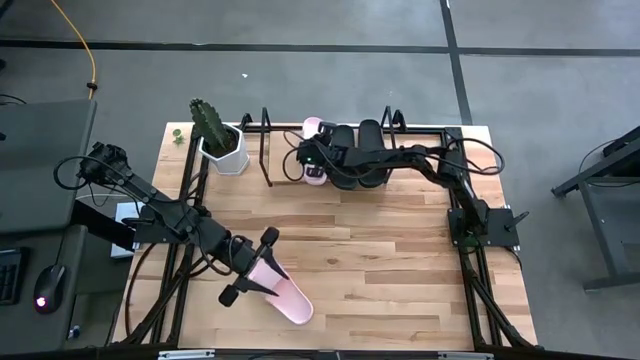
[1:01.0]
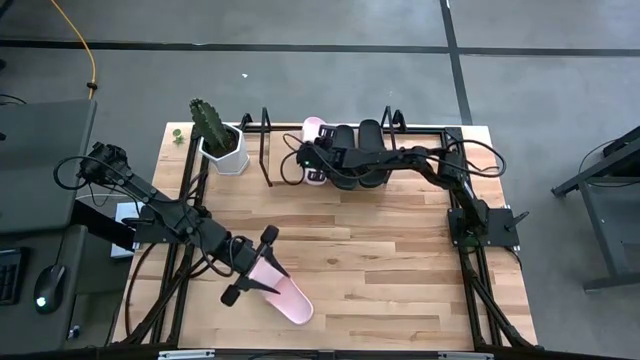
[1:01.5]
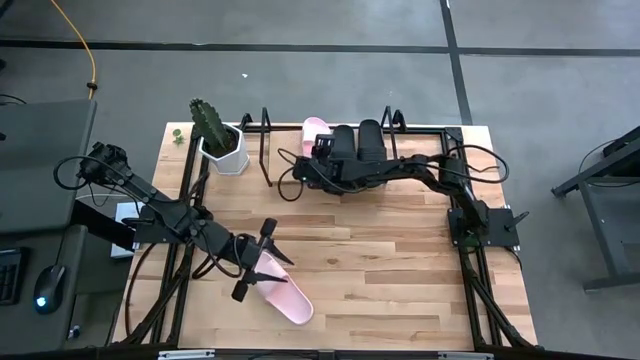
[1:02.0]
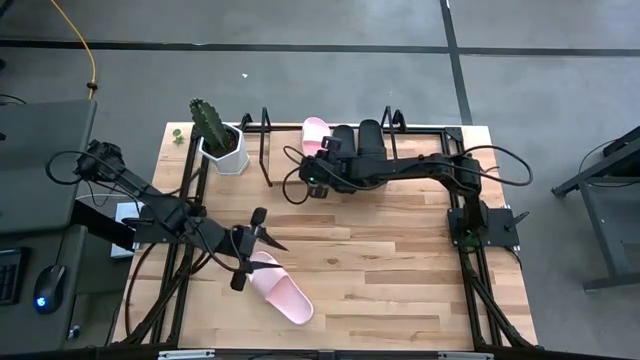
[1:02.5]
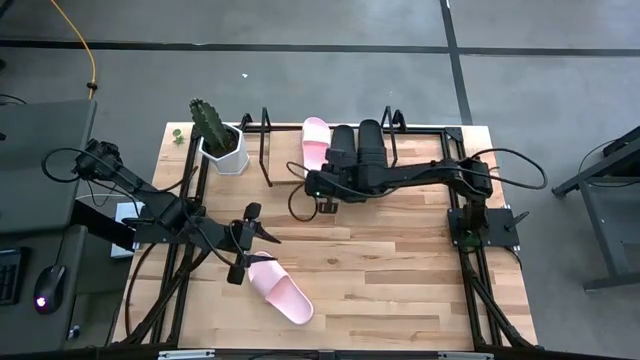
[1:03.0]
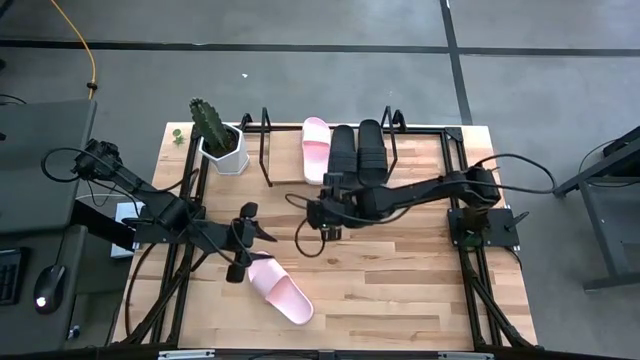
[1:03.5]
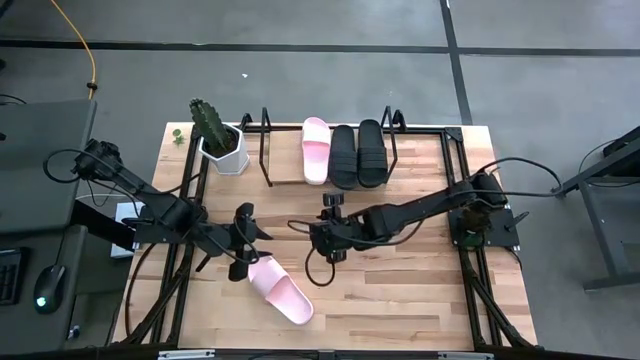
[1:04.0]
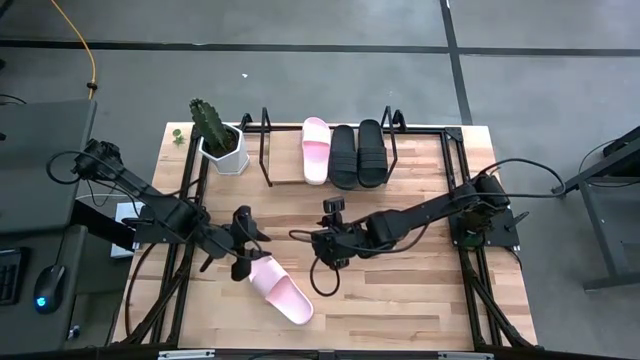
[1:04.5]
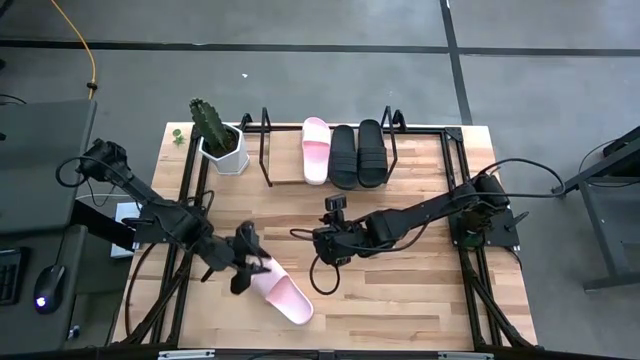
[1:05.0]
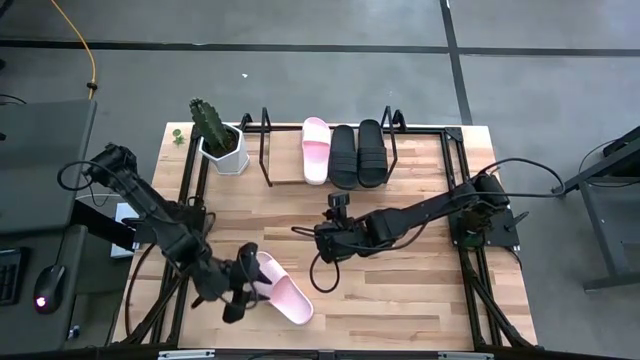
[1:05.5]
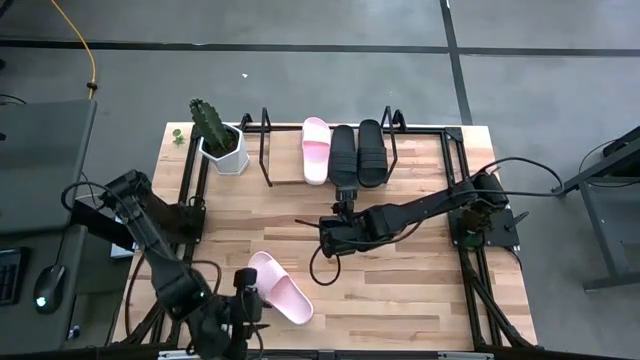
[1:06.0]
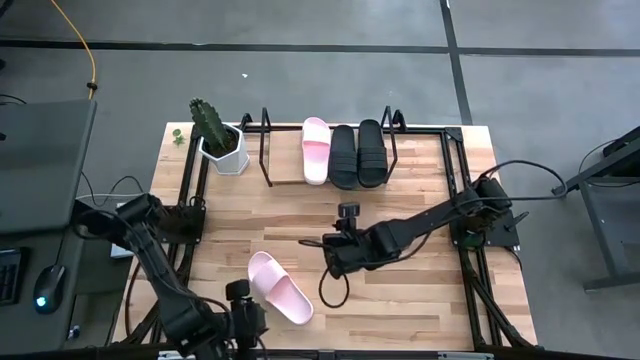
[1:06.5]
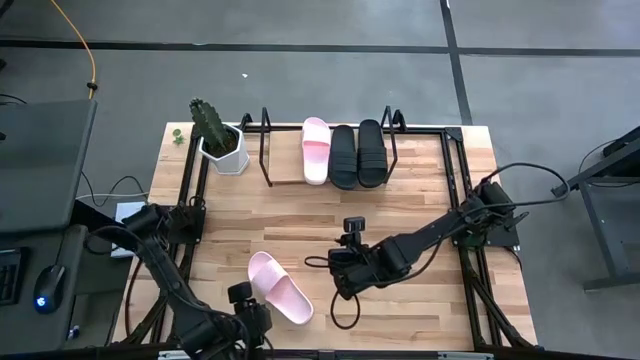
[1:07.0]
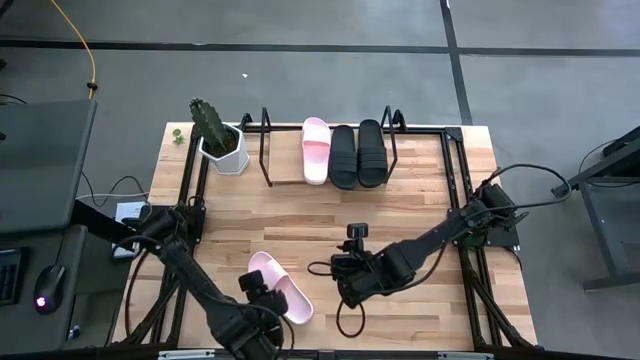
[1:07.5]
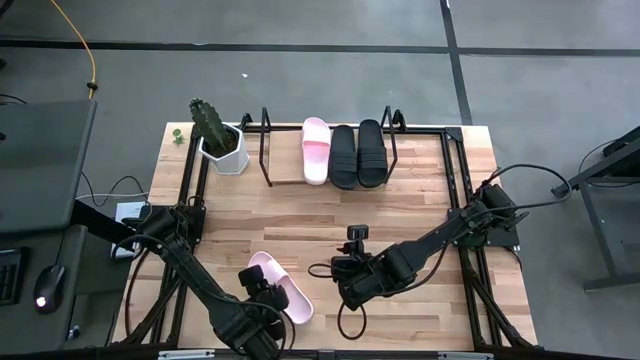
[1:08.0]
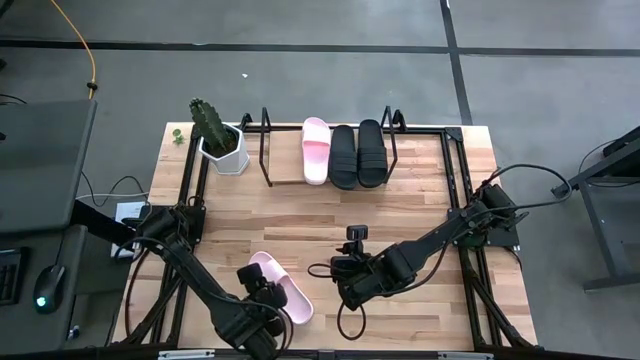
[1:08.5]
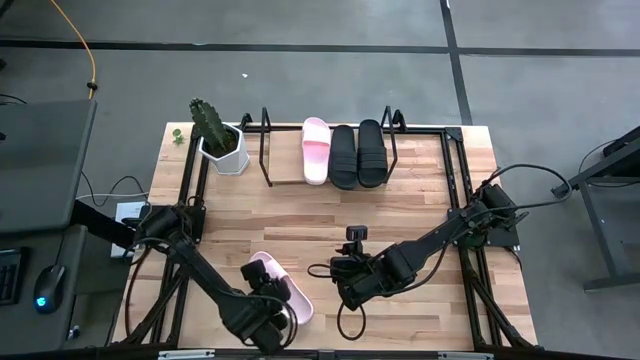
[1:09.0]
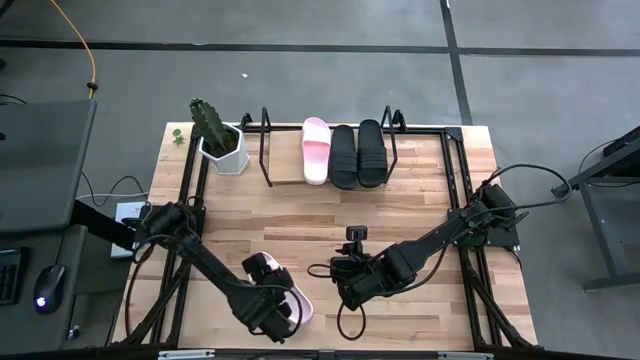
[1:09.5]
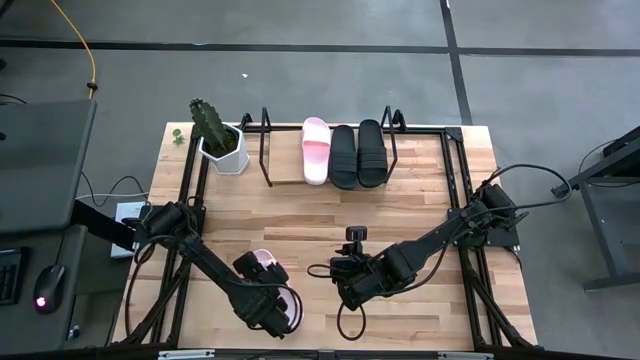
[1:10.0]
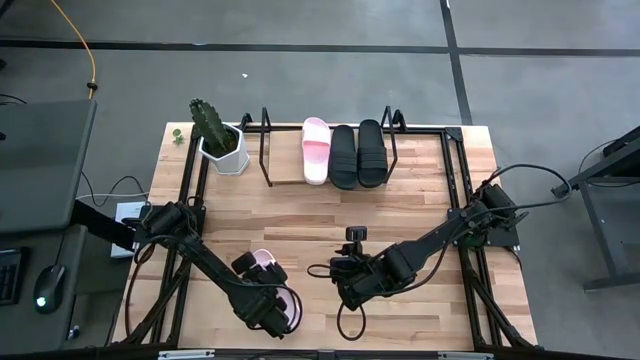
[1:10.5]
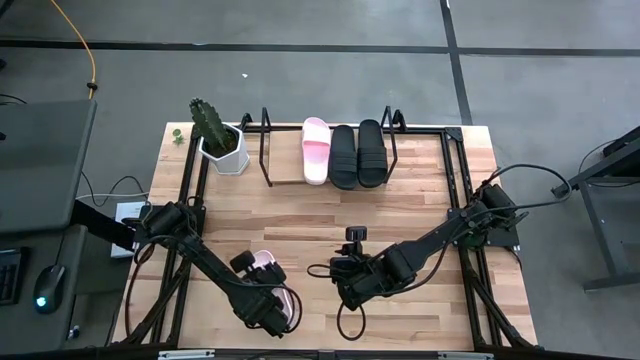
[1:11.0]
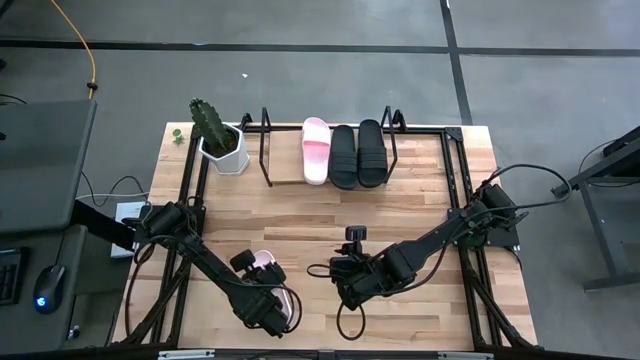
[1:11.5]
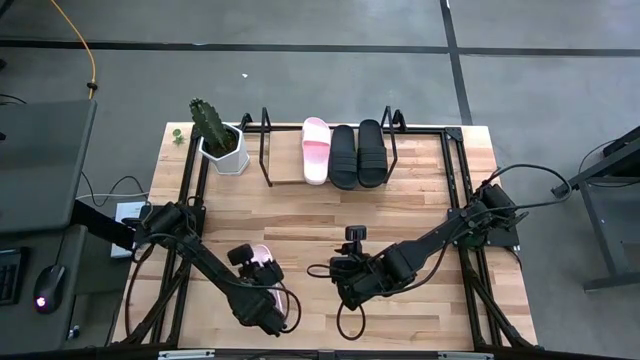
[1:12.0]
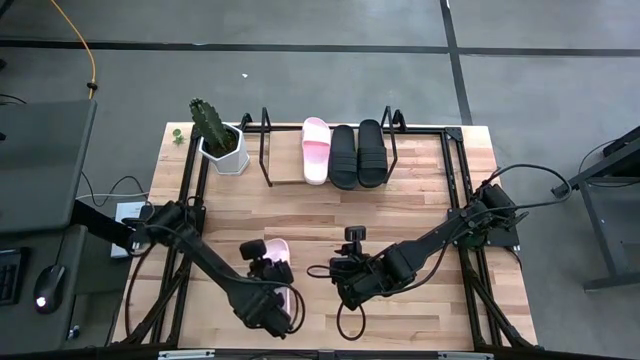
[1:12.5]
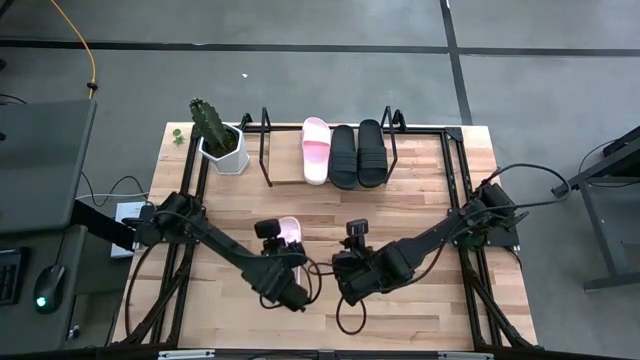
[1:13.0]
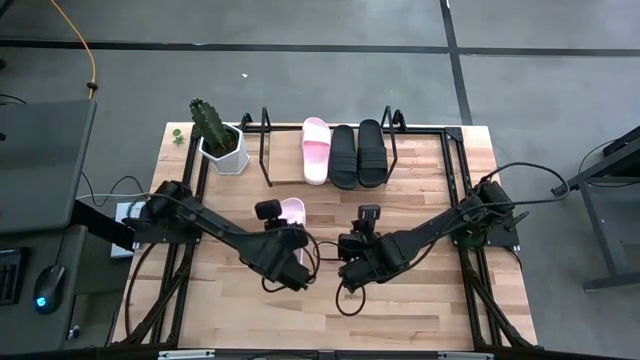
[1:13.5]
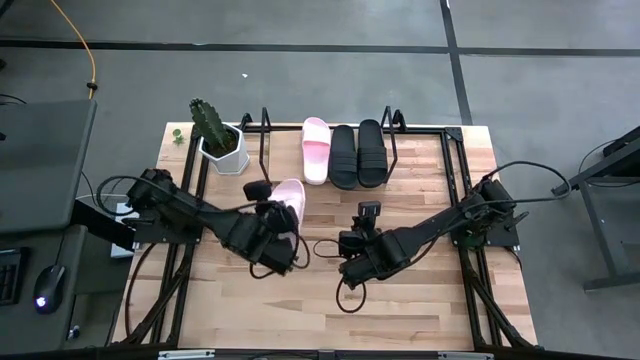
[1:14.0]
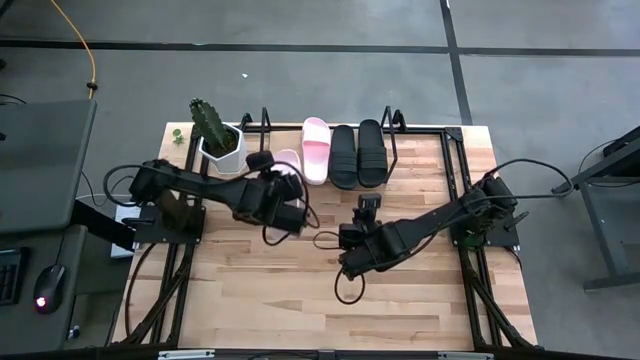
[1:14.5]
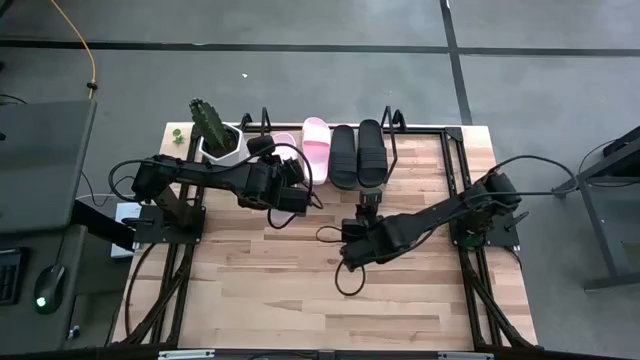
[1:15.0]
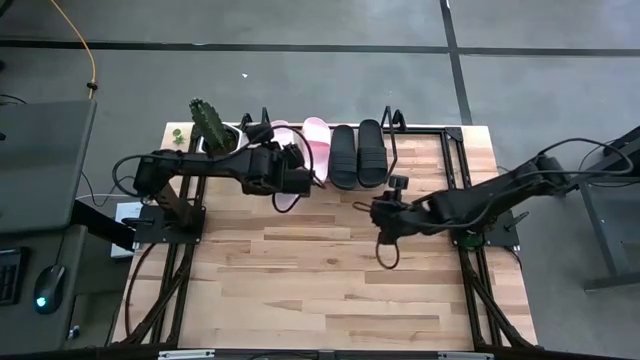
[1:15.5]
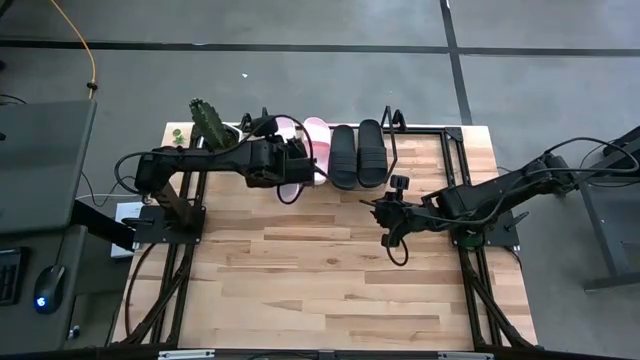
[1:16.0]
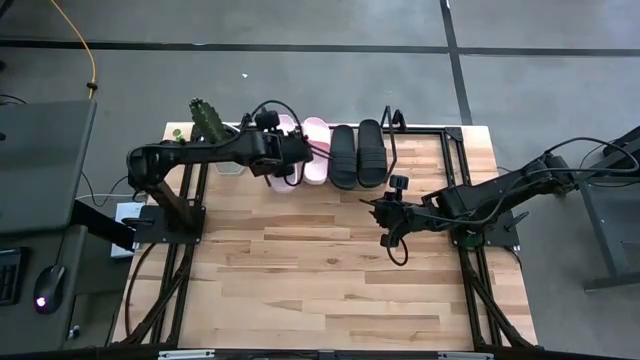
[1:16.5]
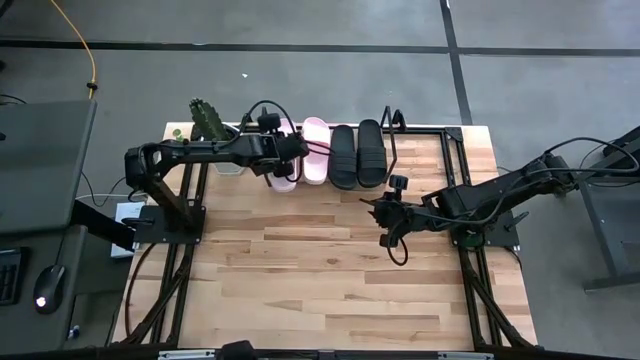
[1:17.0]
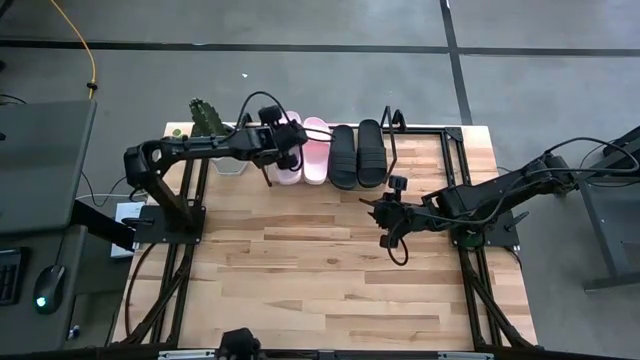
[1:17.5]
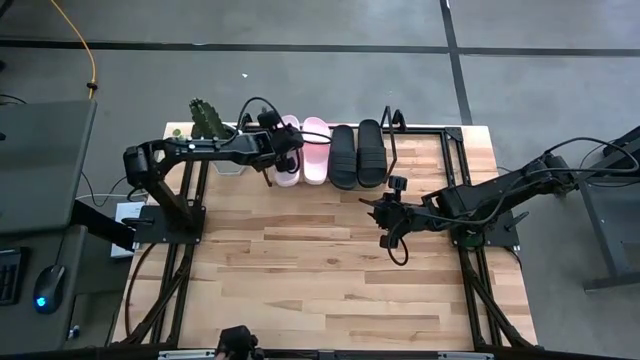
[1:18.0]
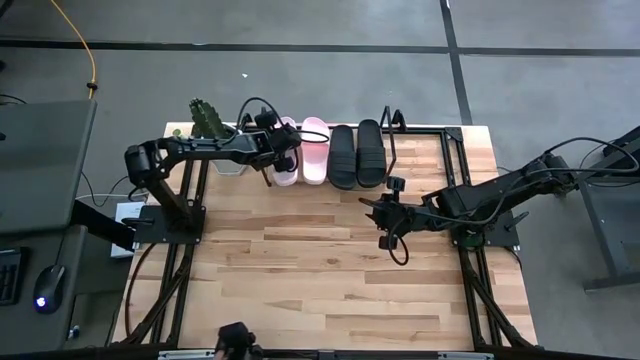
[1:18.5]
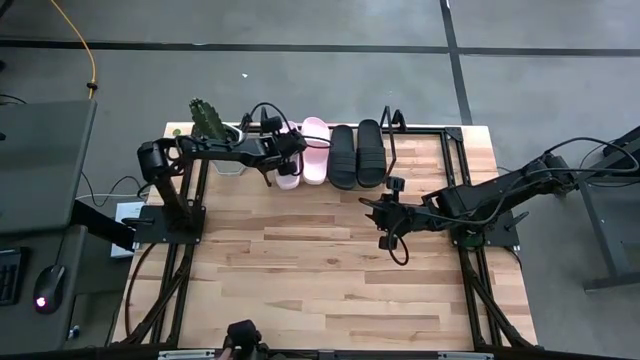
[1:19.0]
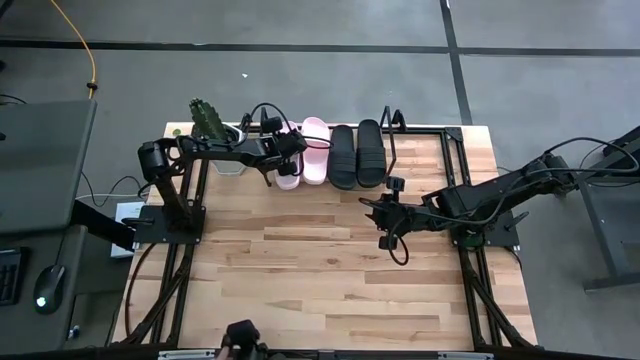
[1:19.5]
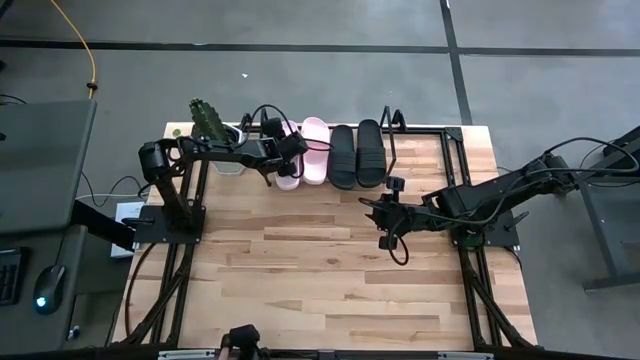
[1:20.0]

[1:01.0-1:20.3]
Task: Pick and place slides into the shelf
Put the pink slides on the shelf

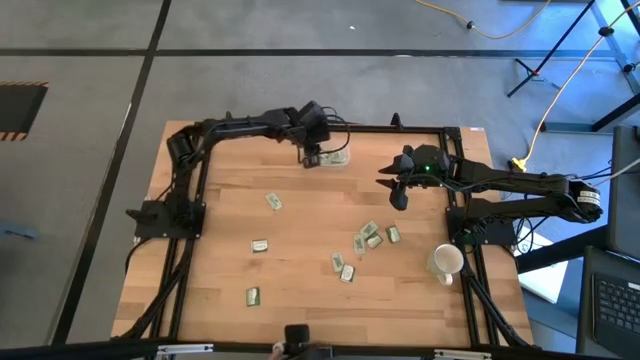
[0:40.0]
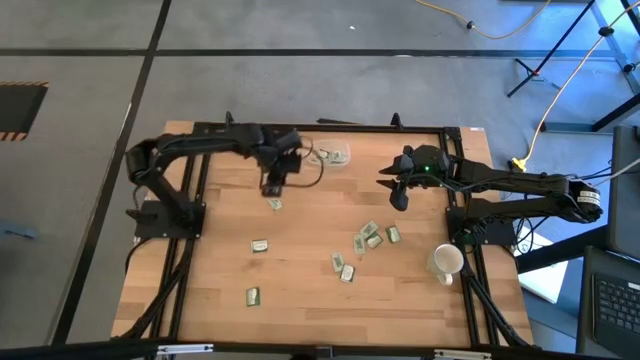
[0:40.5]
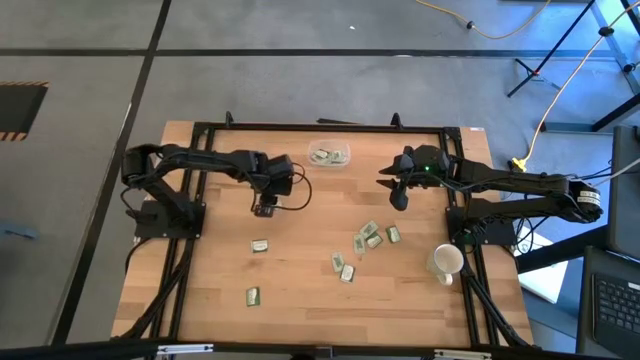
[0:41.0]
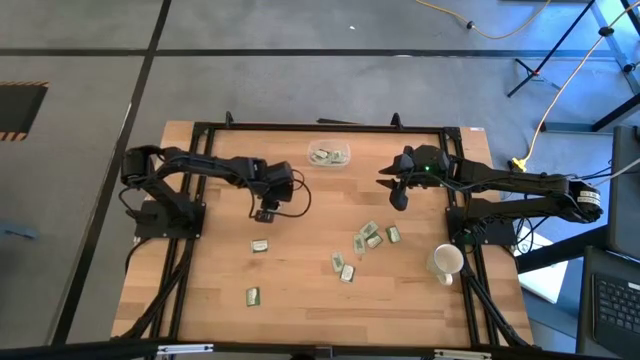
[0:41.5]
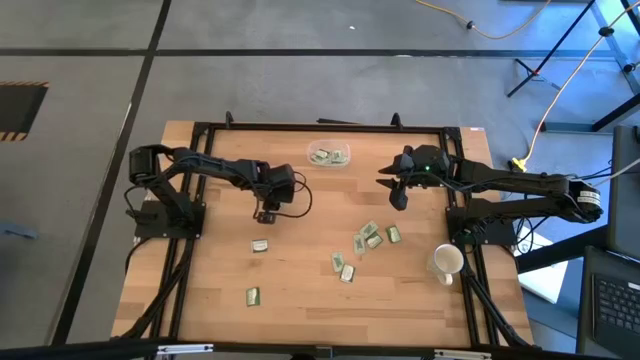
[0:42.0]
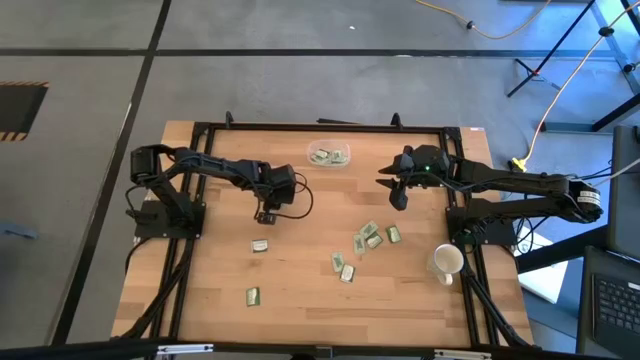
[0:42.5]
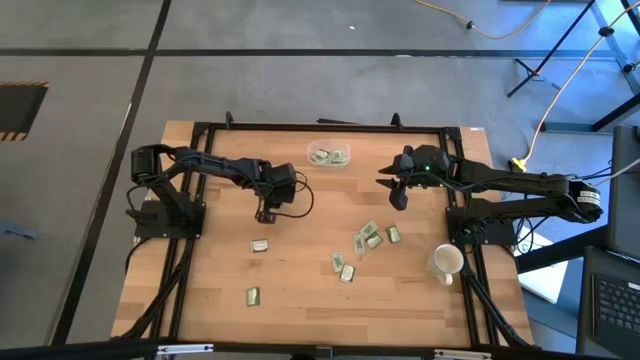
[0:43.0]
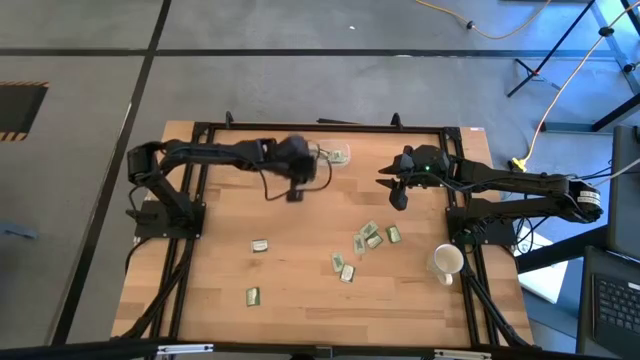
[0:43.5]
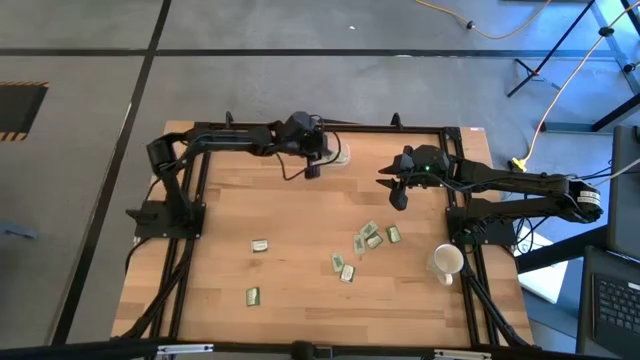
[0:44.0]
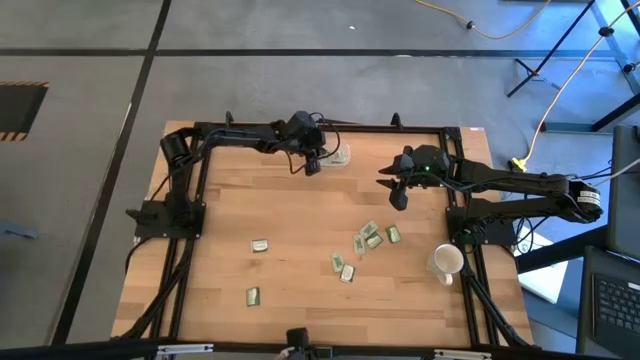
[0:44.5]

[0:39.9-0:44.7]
Task: Pick and place items into bin
Put the white stevia packet into the transparent bin
